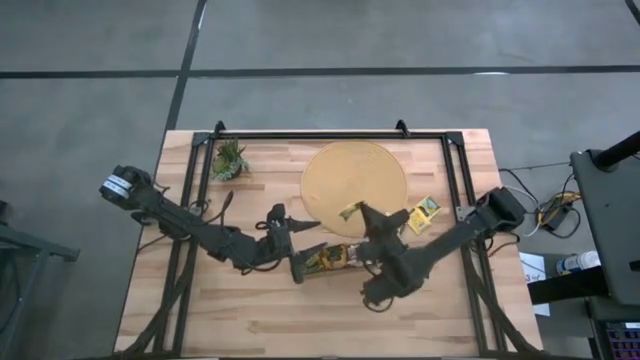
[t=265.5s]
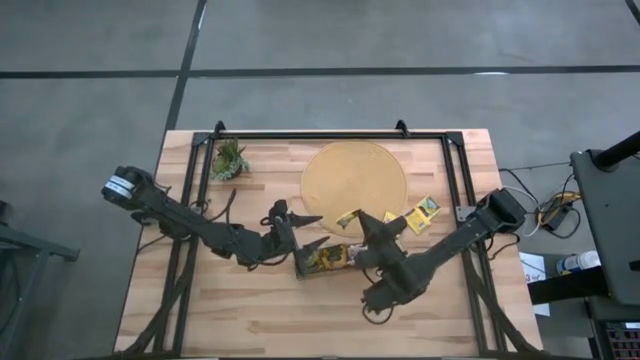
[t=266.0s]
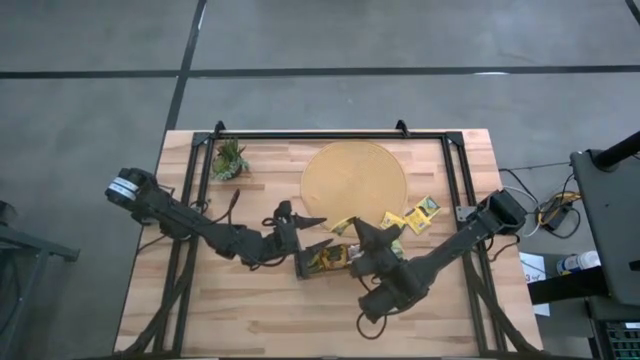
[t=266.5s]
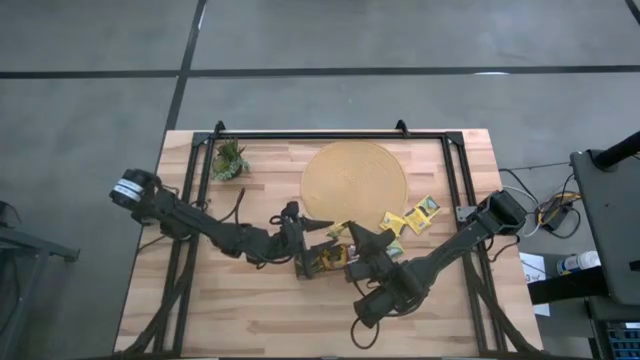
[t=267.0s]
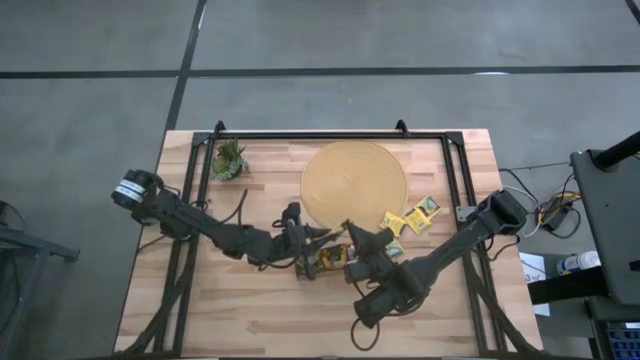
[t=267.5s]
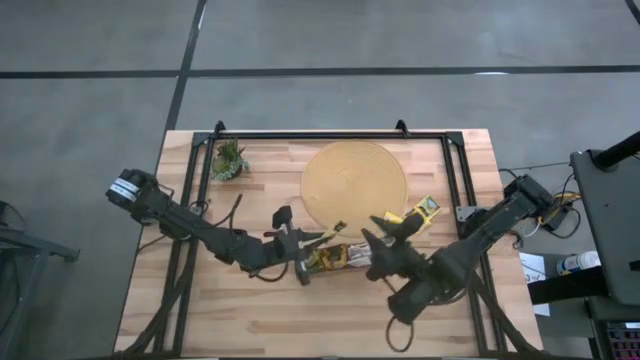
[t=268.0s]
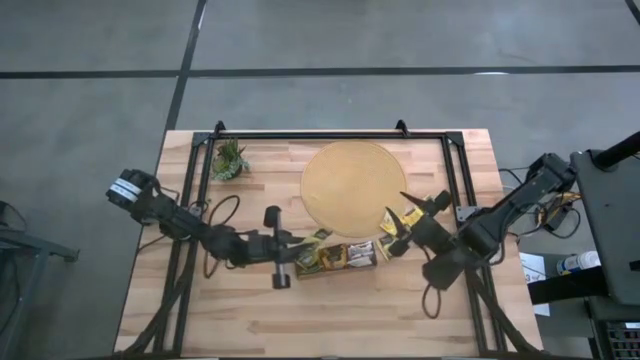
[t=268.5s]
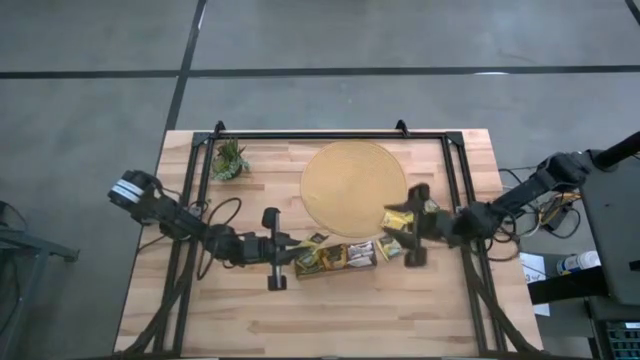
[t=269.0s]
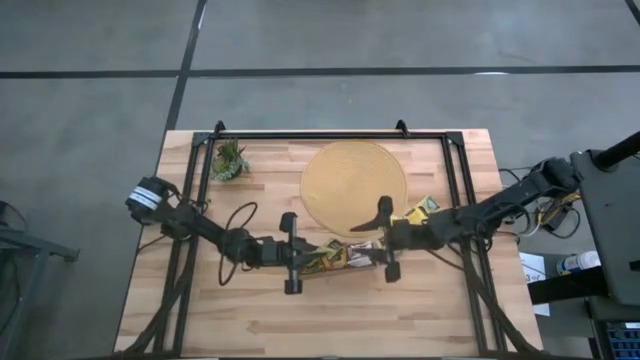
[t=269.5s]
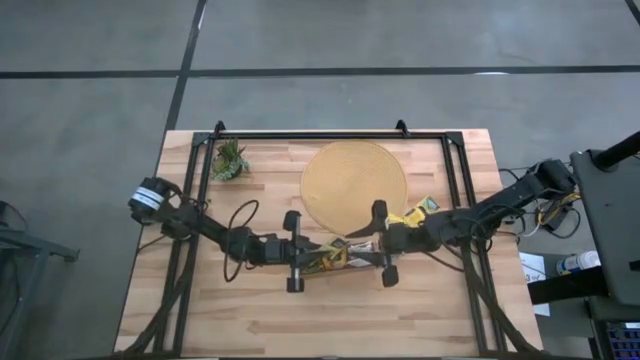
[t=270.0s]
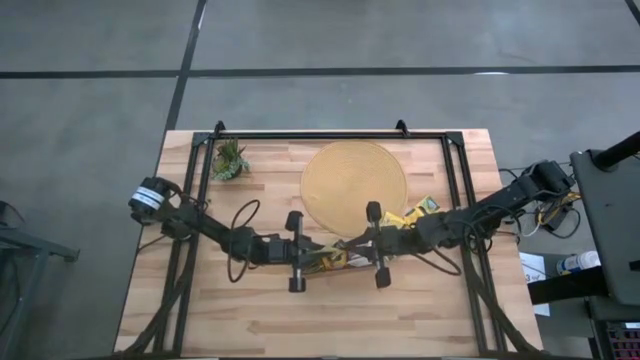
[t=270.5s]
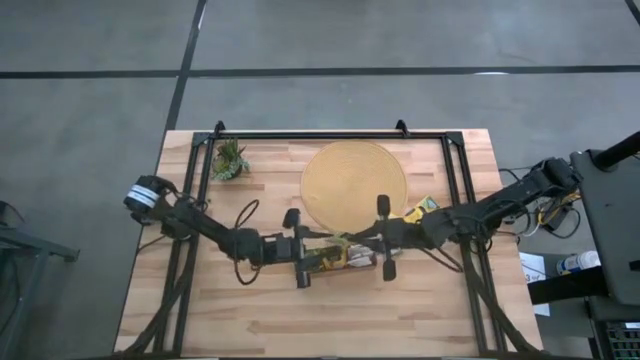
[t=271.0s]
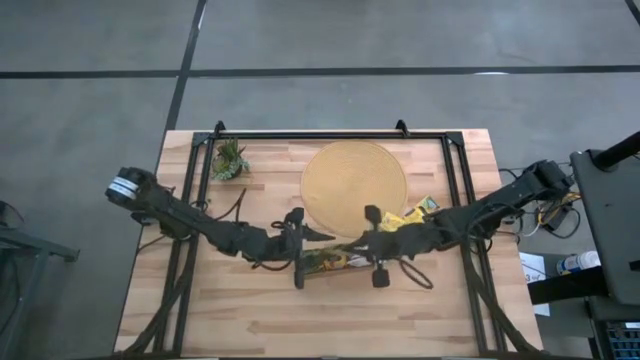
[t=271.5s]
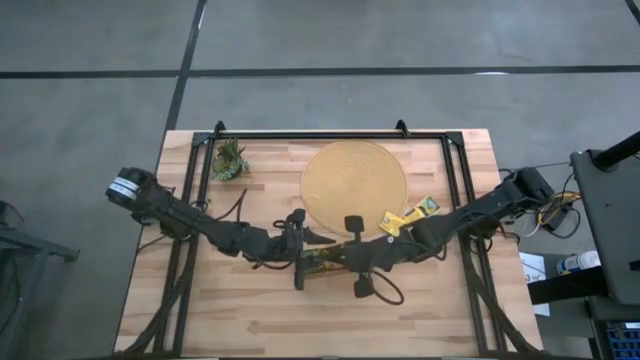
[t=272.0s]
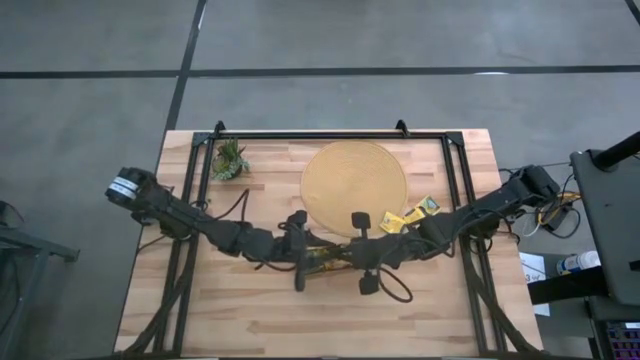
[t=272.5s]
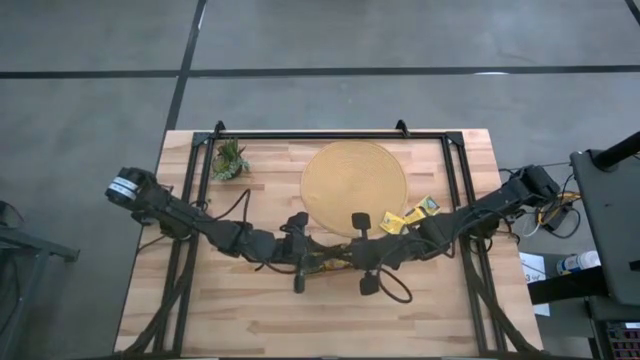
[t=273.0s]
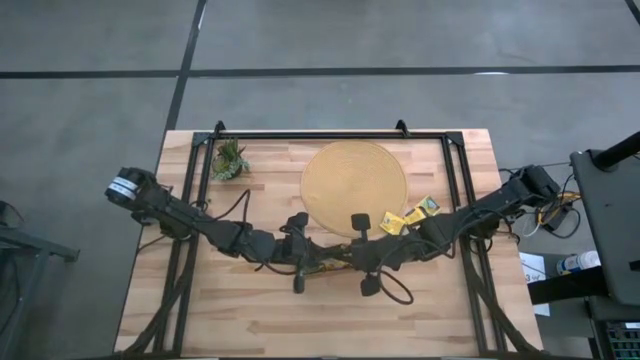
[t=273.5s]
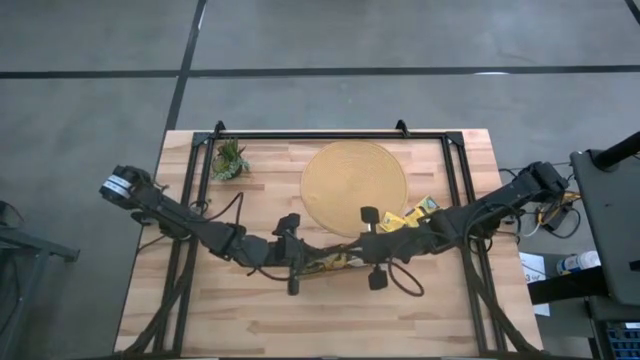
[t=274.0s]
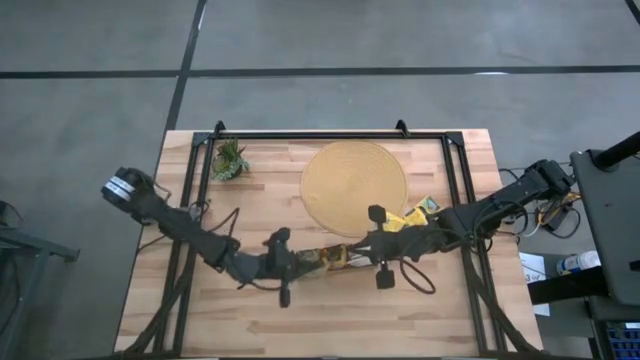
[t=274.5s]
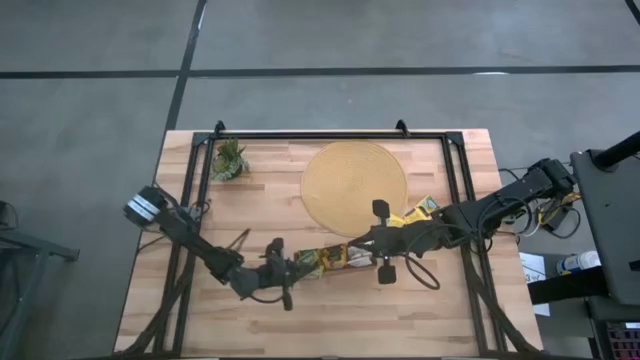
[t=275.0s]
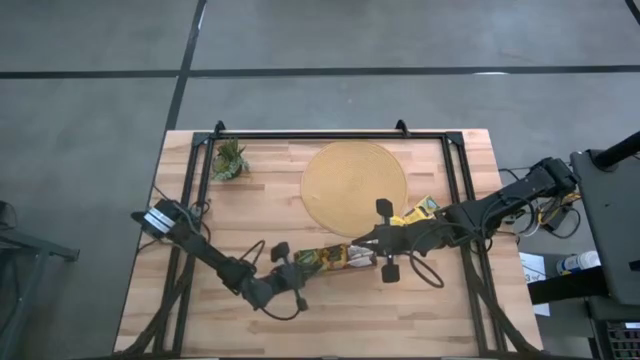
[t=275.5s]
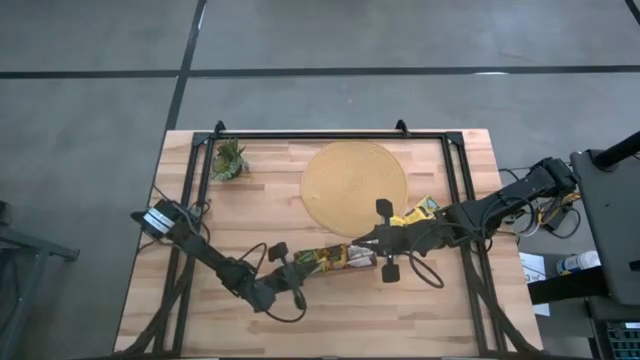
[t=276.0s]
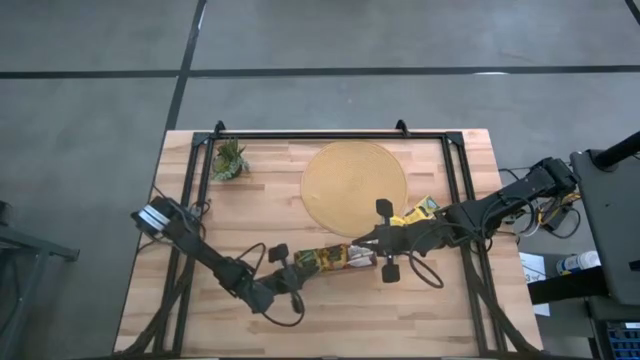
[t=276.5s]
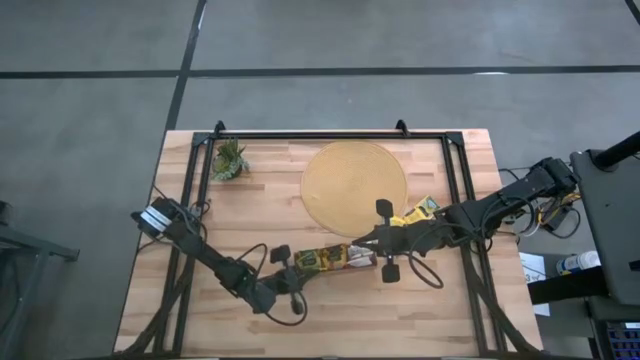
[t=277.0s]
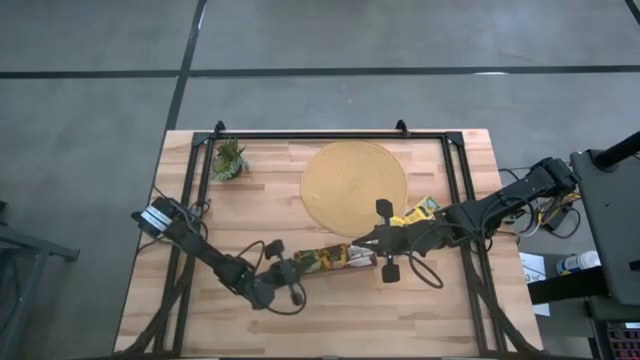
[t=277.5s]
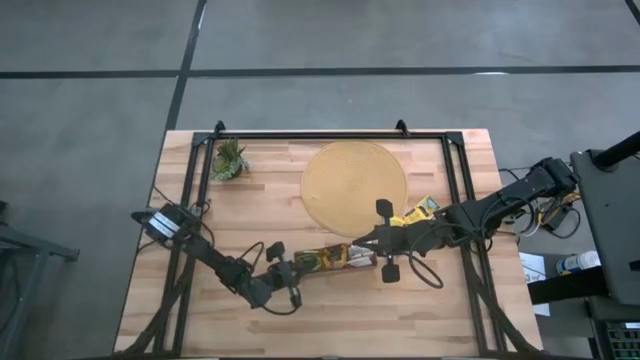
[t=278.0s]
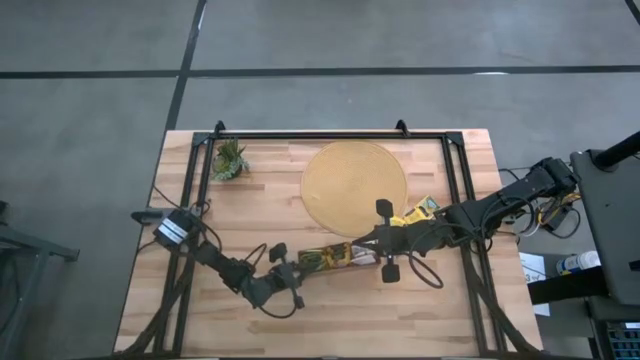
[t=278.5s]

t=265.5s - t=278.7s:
Task: Pick & Place Tea
Put the yellow tea bag into the left section of the wooden organizer
